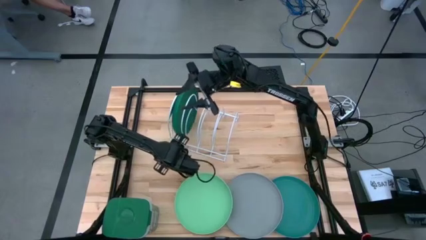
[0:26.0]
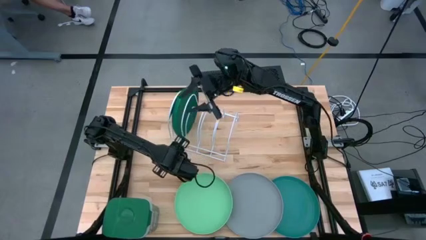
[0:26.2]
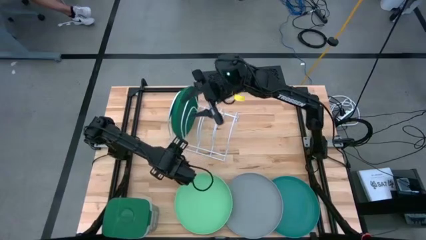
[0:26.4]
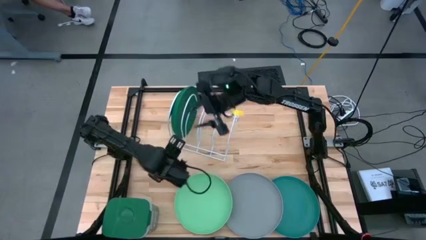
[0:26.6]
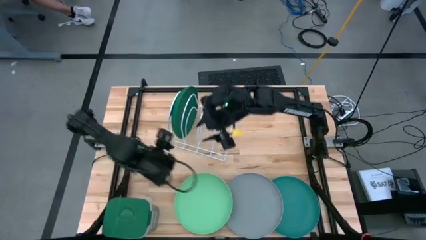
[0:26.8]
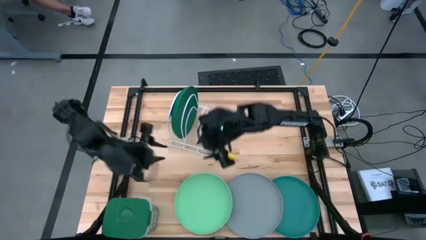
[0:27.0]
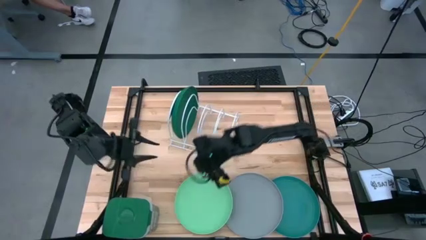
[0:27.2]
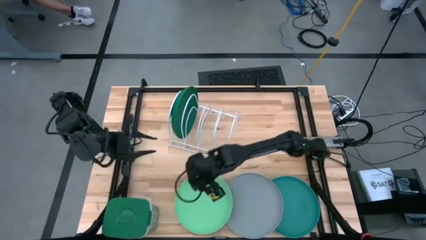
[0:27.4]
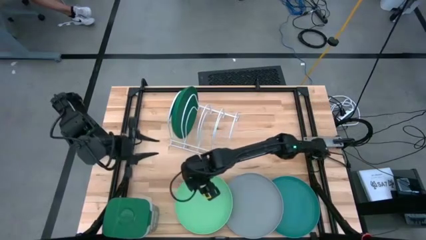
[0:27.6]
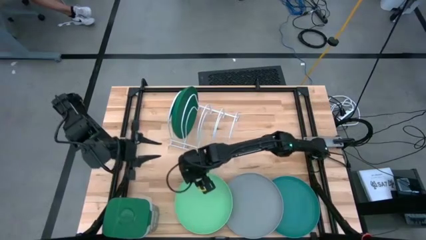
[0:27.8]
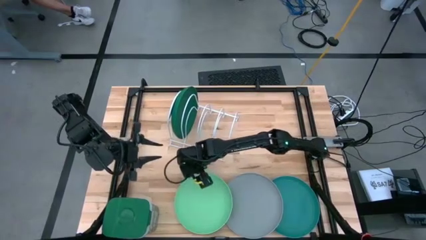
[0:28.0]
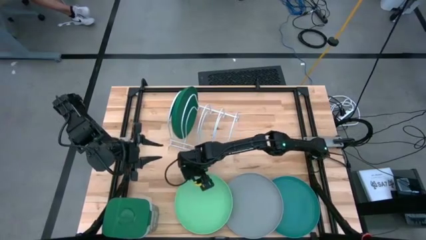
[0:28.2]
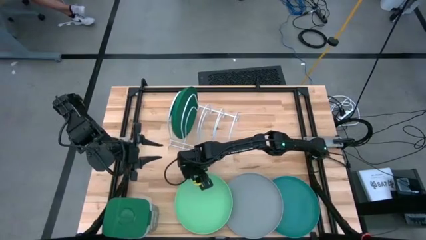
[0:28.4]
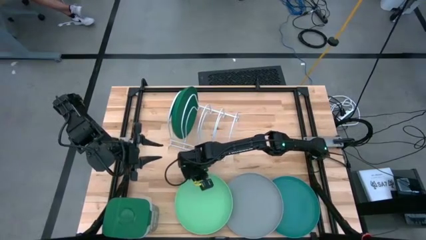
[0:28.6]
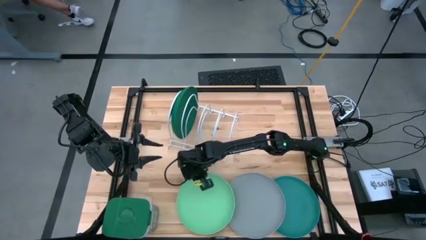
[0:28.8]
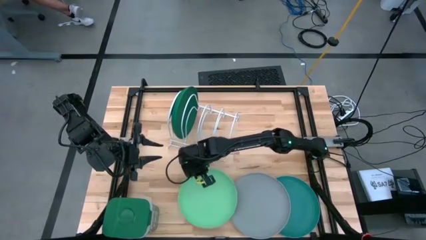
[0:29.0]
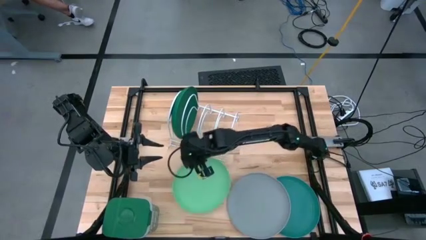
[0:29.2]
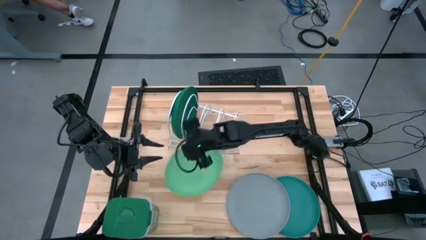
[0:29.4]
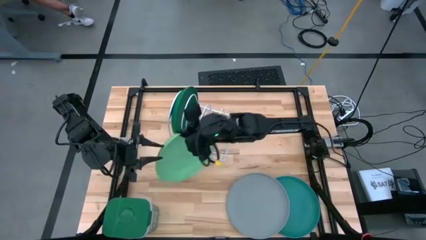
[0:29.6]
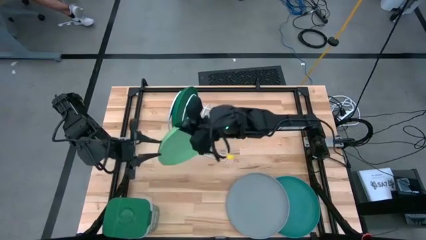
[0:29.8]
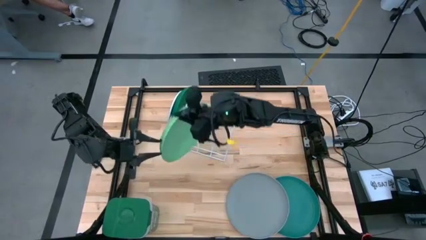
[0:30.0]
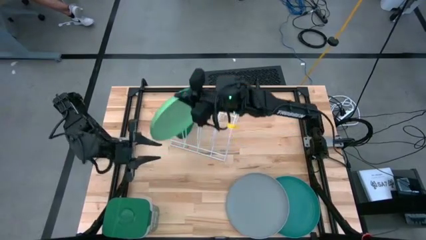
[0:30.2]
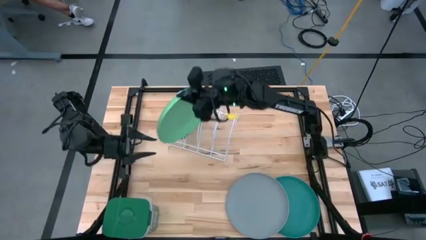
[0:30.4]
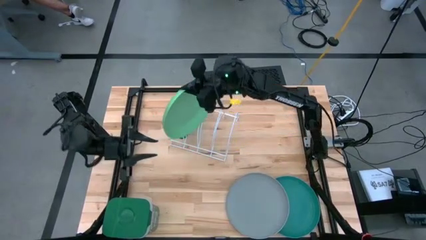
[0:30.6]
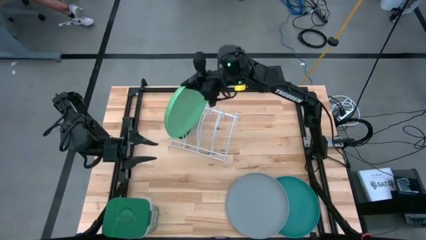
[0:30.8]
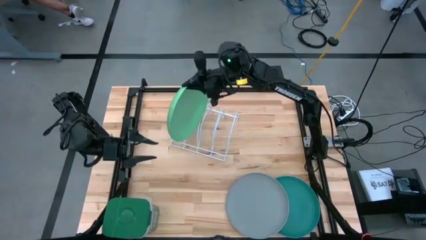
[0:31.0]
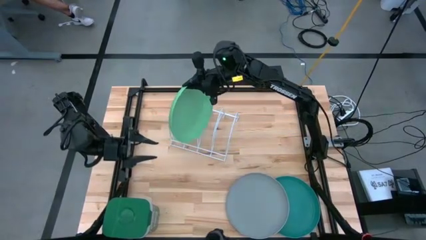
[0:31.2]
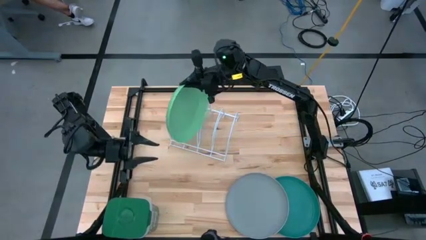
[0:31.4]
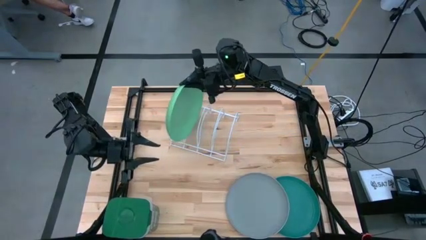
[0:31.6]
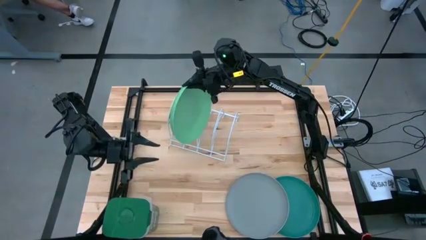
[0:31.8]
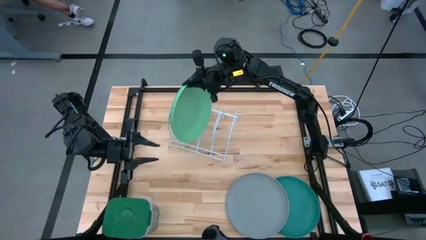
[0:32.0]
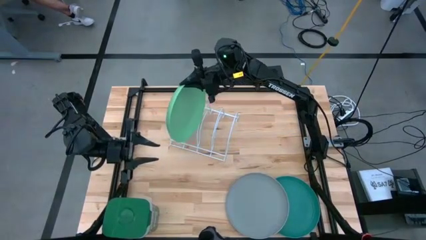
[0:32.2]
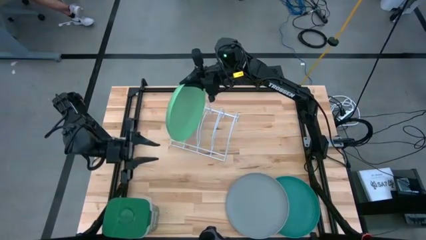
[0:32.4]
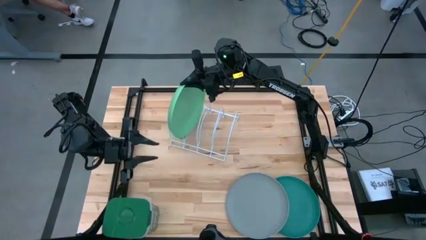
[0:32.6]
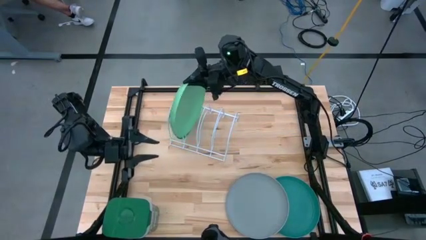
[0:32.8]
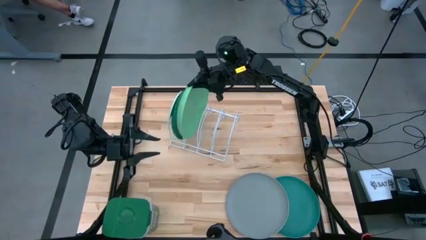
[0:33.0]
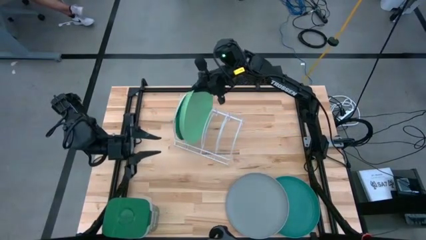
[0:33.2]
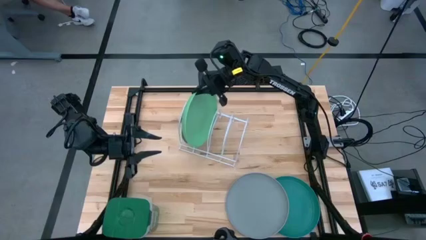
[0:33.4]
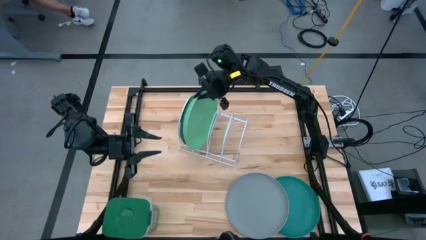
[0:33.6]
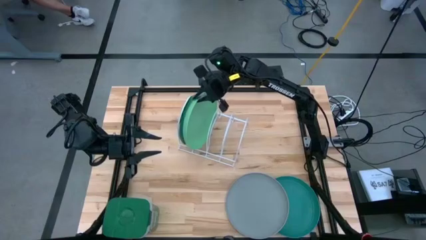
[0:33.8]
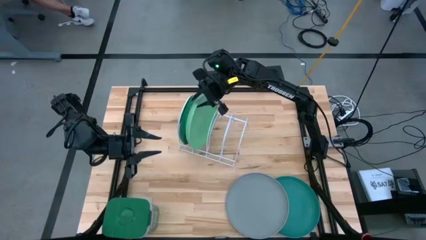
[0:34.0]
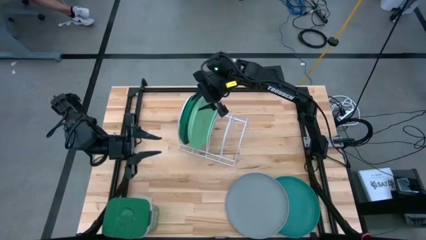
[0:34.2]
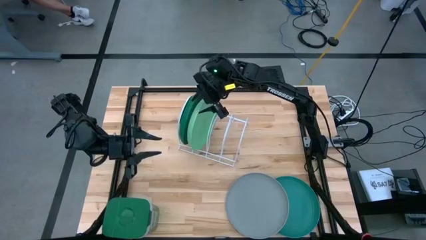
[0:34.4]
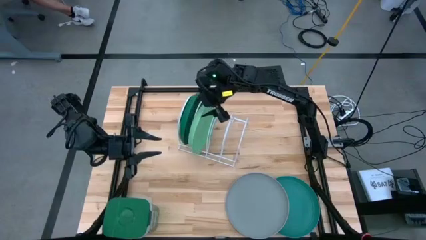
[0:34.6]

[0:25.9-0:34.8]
Task: Sort dishes
Put the light green plate into the white dish rack

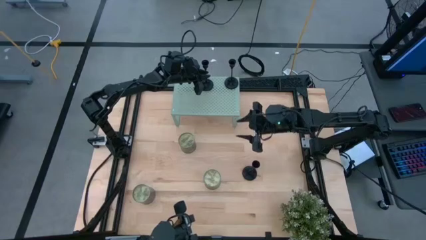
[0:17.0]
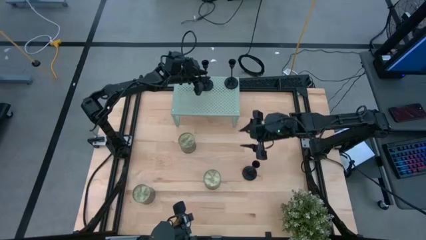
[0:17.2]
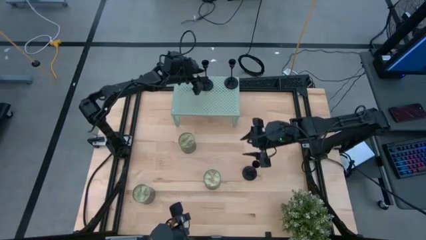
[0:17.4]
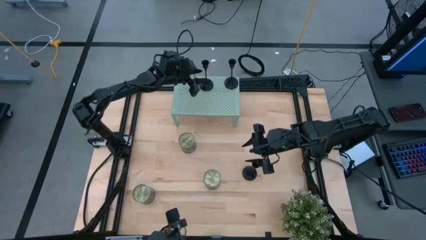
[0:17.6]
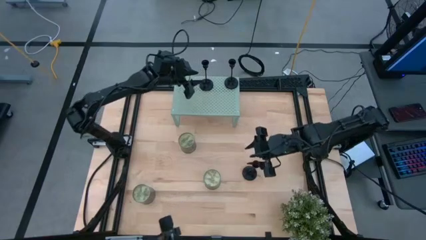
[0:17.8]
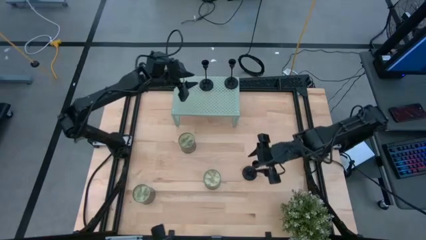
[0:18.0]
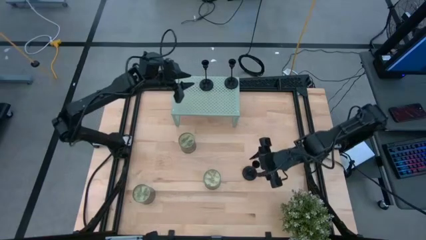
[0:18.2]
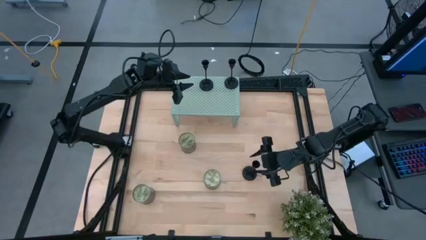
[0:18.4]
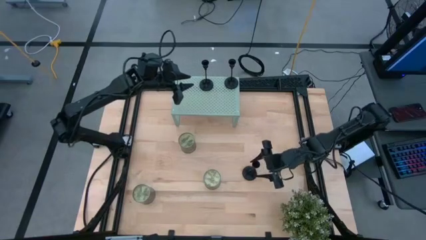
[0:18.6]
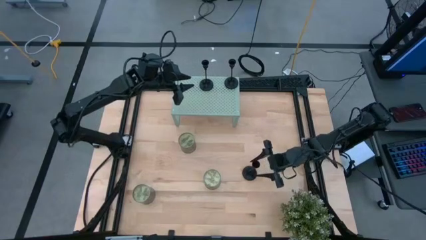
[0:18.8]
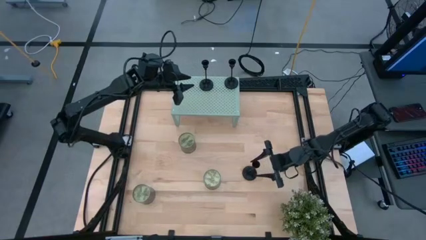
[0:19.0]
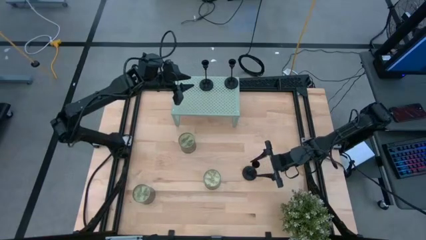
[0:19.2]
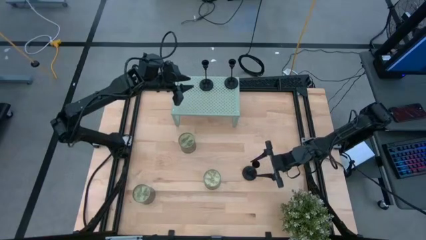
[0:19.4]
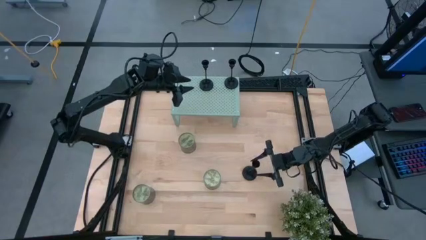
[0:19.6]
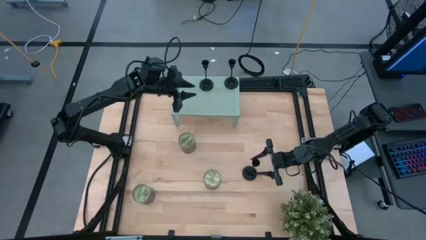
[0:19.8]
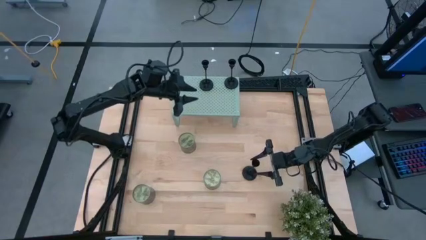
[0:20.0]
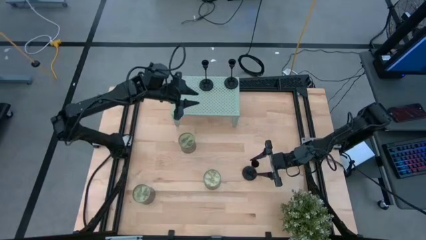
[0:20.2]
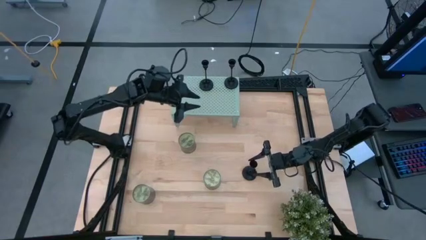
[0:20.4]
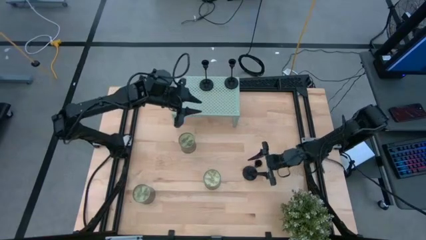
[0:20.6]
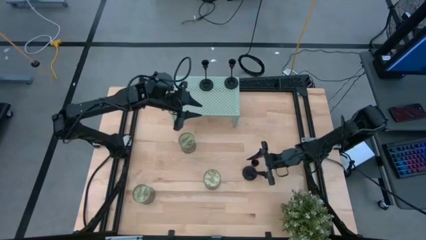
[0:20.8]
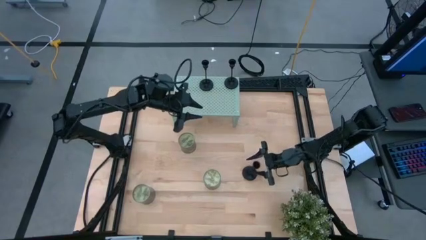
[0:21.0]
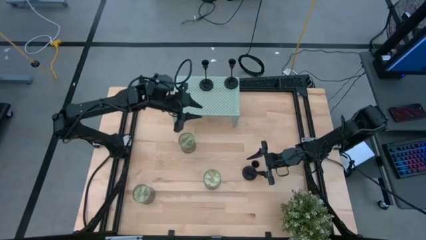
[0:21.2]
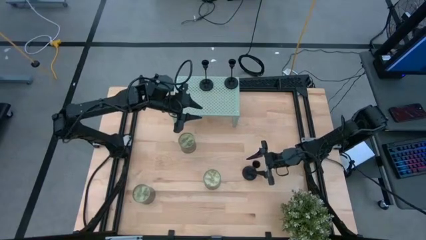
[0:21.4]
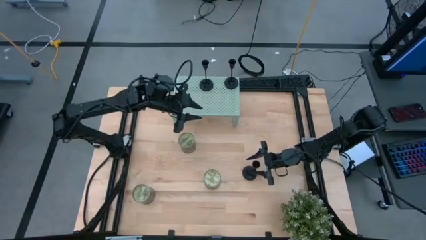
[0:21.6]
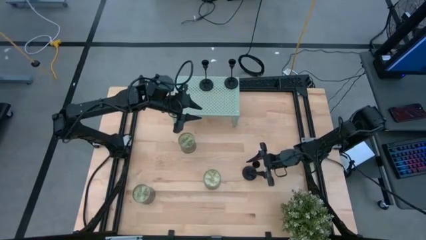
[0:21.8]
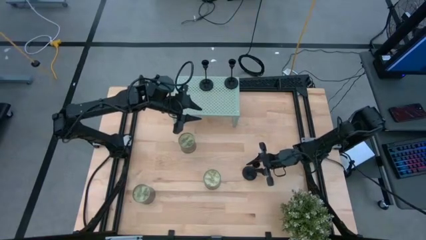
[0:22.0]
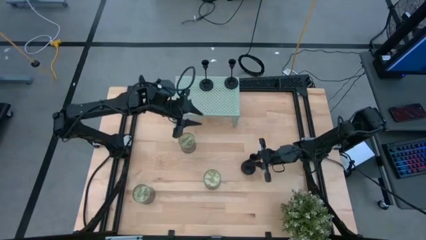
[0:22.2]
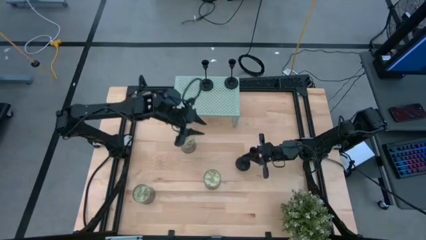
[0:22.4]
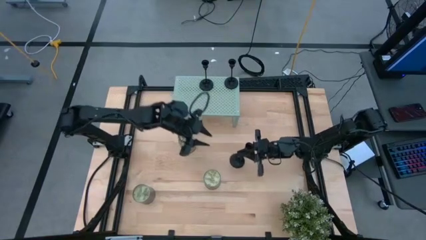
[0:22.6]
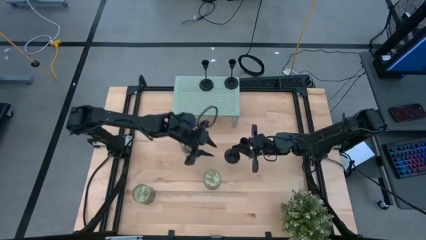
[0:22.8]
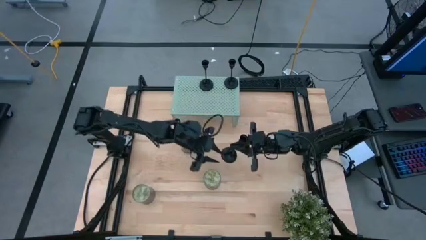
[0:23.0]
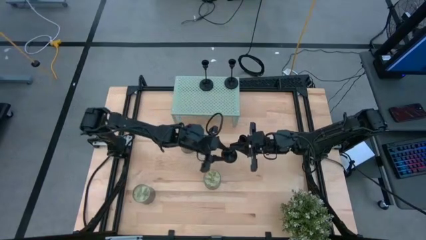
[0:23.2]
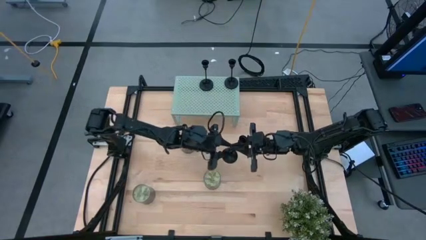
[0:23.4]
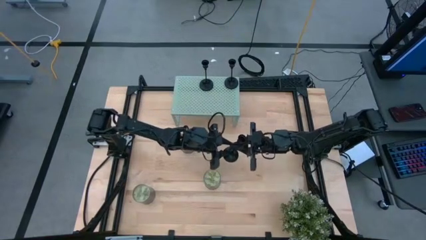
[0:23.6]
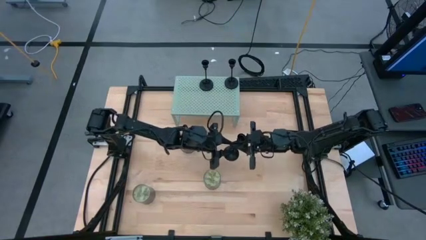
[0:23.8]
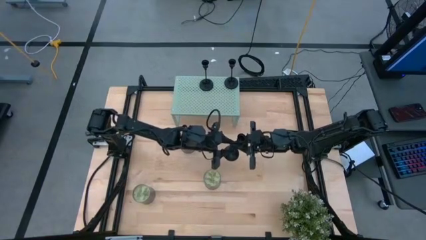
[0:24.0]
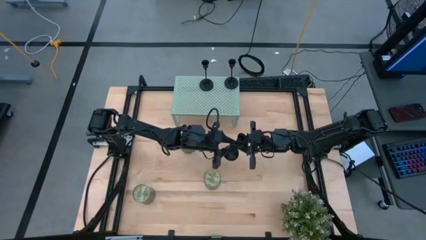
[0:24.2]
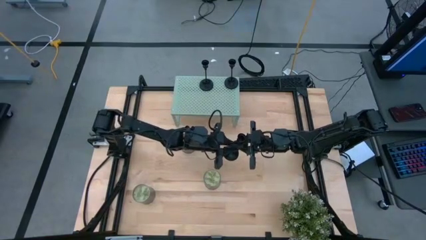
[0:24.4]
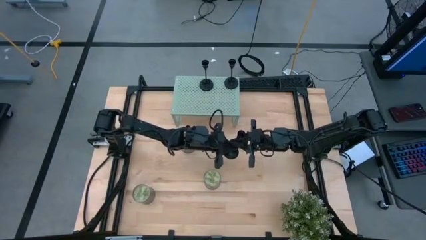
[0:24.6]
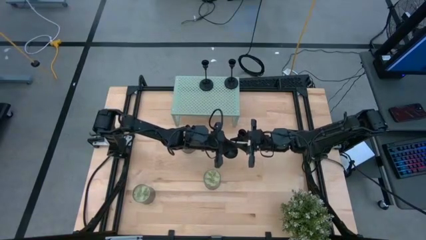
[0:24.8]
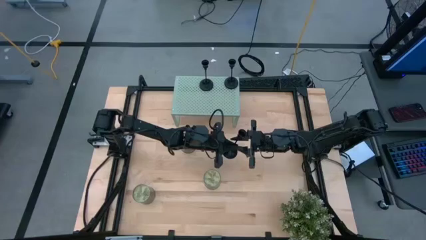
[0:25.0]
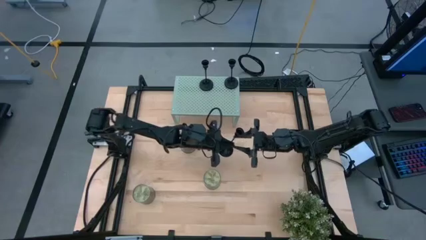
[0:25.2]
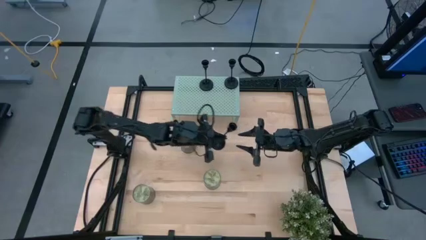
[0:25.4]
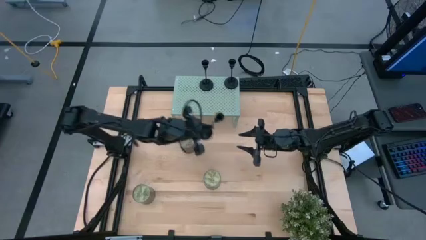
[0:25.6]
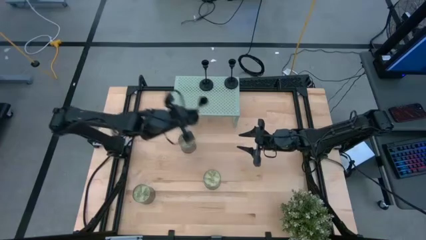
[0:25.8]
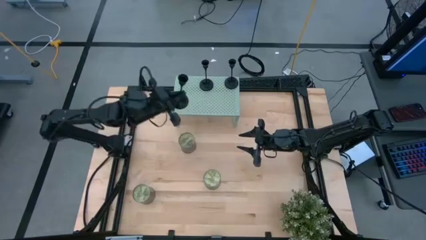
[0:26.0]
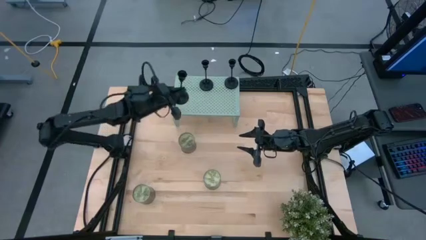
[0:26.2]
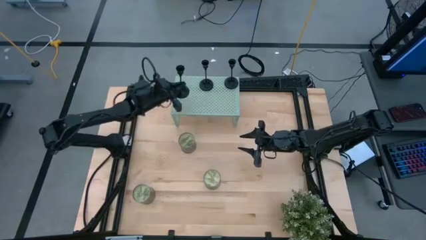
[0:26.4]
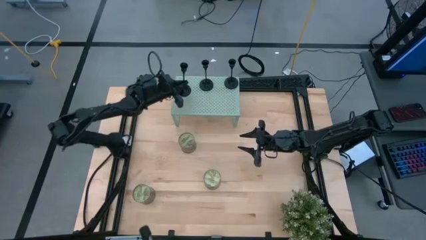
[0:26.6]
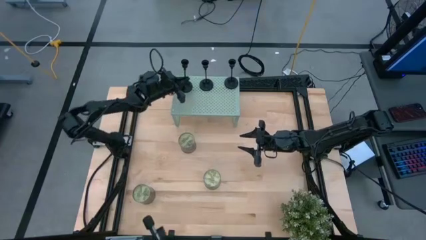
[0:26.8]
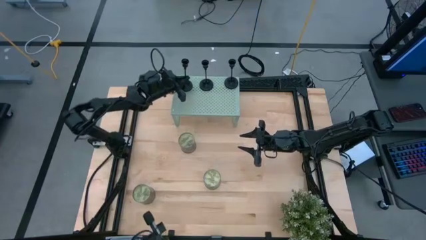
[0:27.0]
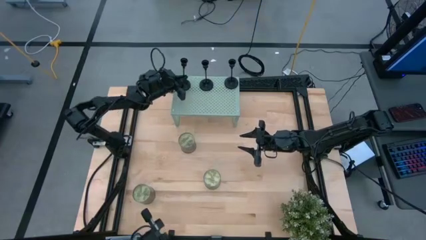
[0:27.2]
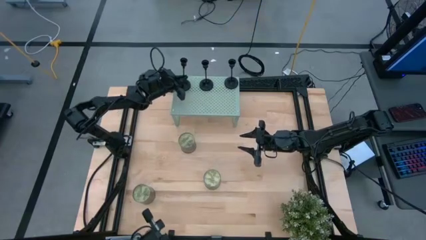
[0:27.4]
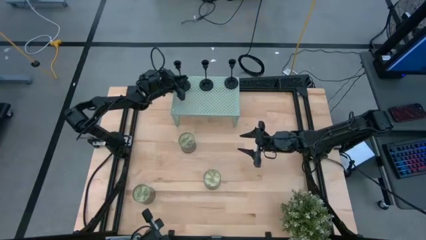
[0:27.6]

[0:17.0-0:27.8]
Task: Pick & Place candle stick holders
Put the black candlestick holder on the shelf
